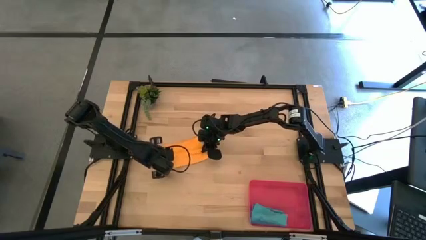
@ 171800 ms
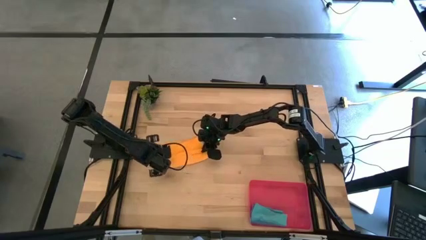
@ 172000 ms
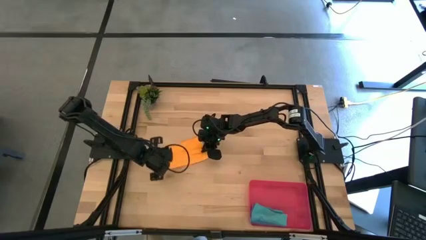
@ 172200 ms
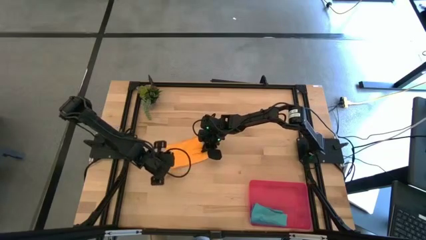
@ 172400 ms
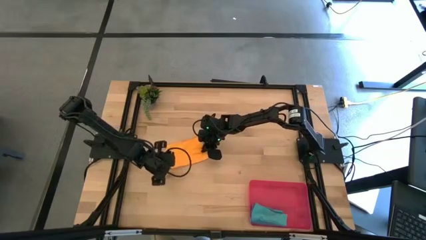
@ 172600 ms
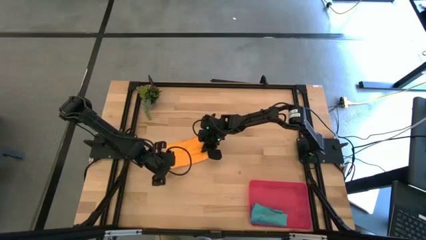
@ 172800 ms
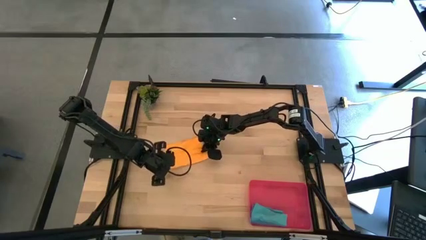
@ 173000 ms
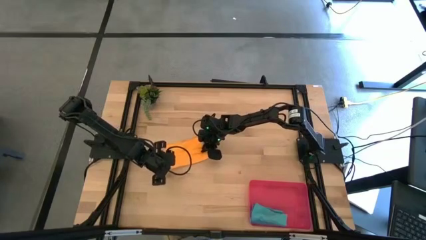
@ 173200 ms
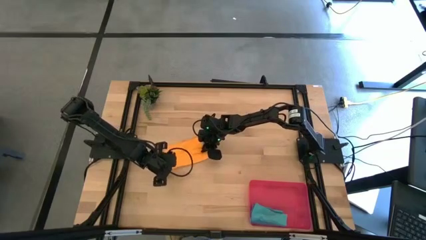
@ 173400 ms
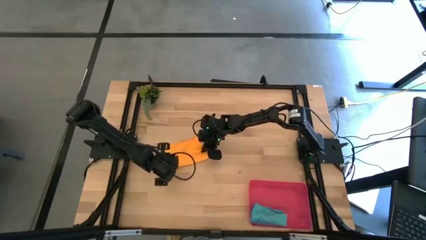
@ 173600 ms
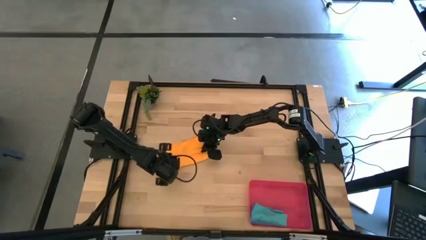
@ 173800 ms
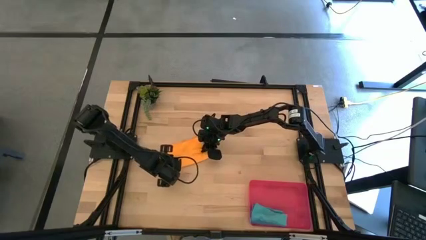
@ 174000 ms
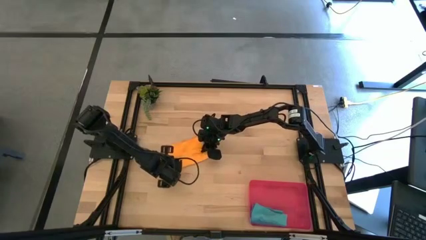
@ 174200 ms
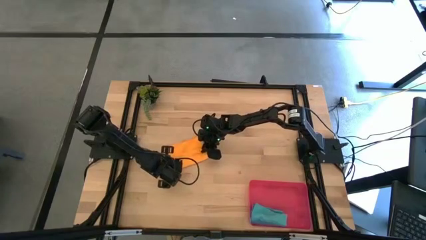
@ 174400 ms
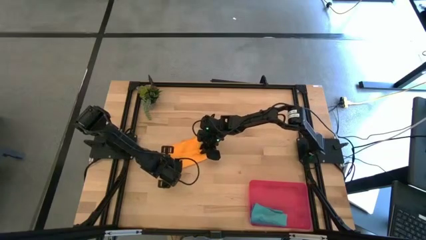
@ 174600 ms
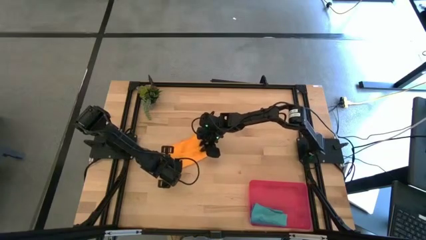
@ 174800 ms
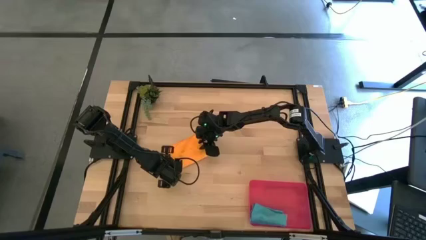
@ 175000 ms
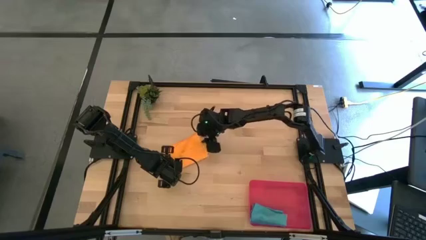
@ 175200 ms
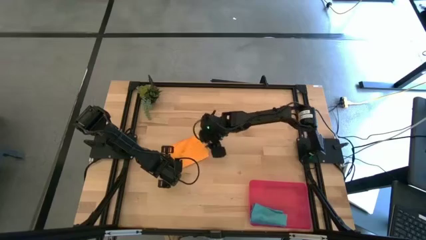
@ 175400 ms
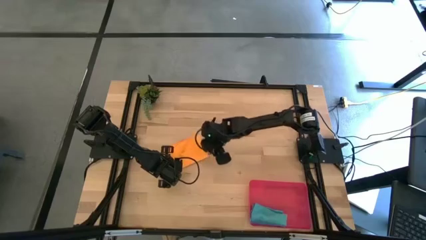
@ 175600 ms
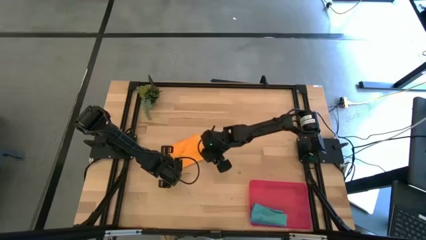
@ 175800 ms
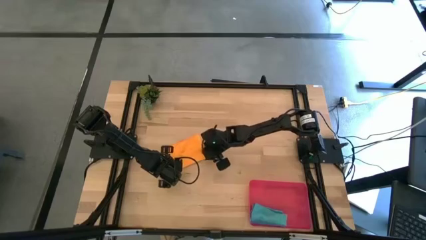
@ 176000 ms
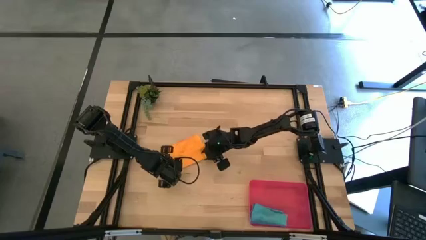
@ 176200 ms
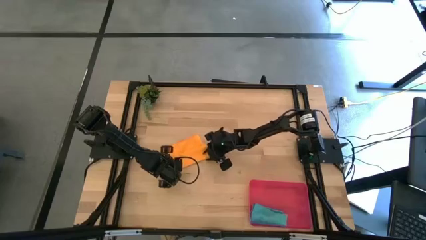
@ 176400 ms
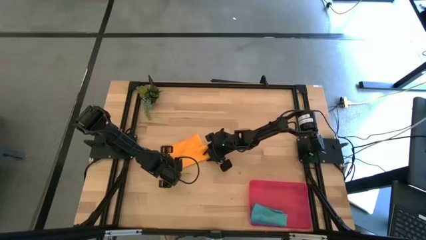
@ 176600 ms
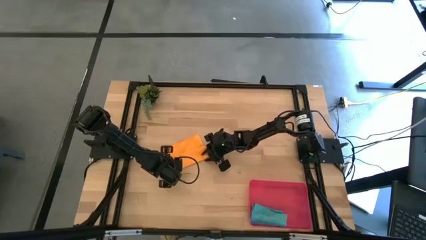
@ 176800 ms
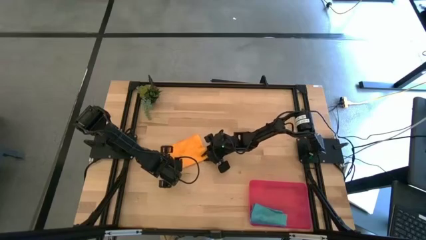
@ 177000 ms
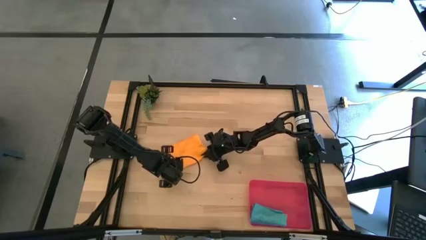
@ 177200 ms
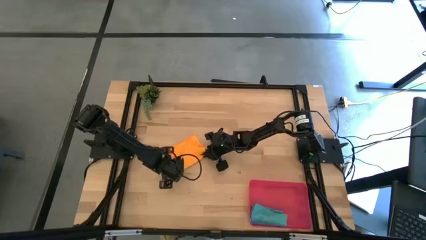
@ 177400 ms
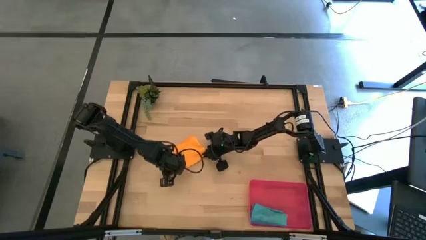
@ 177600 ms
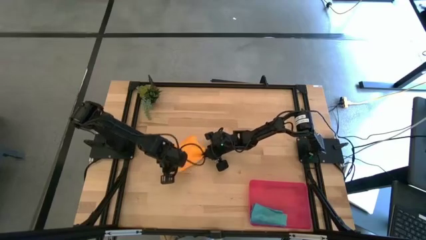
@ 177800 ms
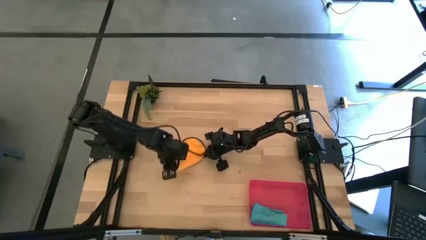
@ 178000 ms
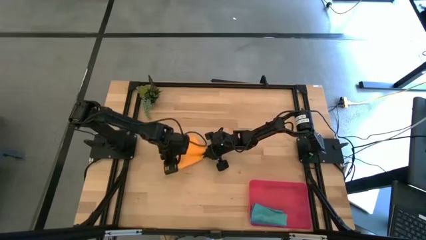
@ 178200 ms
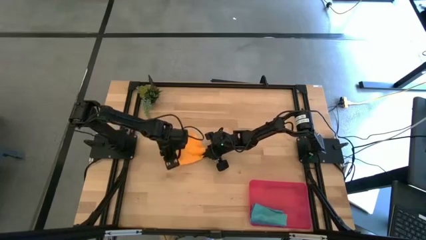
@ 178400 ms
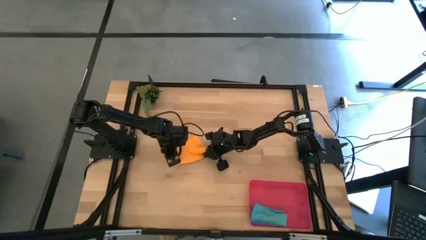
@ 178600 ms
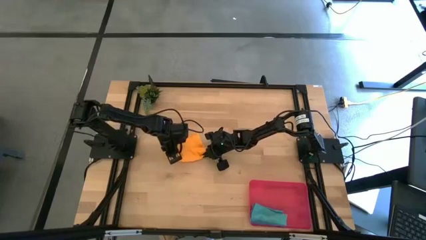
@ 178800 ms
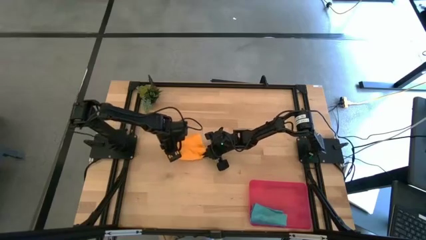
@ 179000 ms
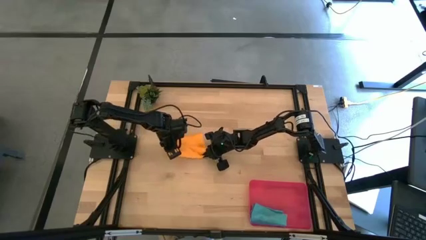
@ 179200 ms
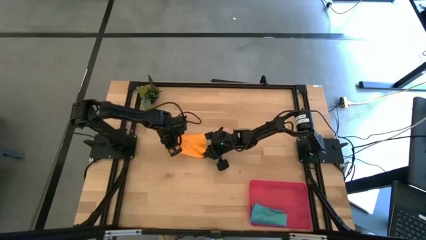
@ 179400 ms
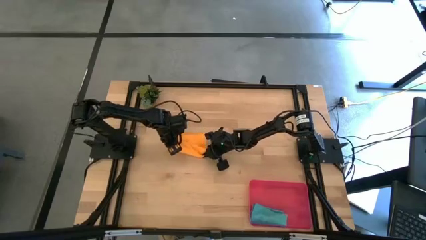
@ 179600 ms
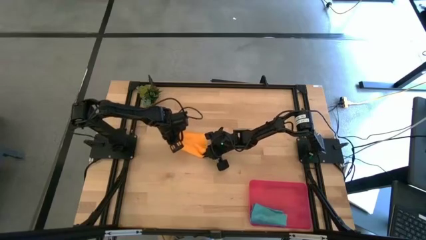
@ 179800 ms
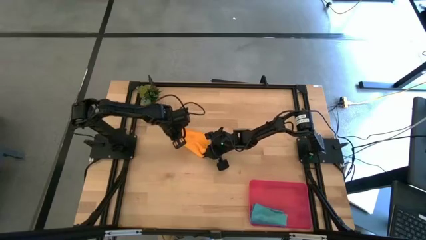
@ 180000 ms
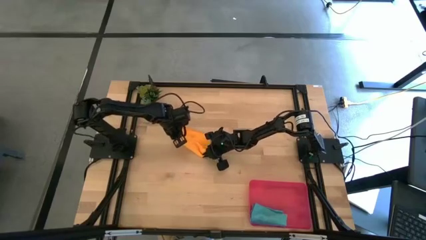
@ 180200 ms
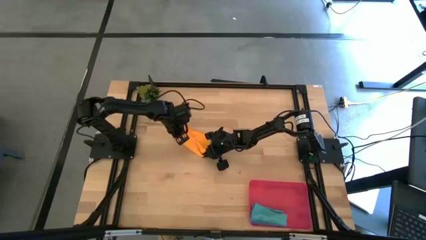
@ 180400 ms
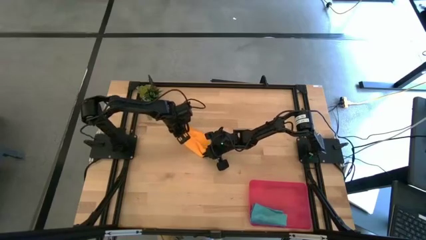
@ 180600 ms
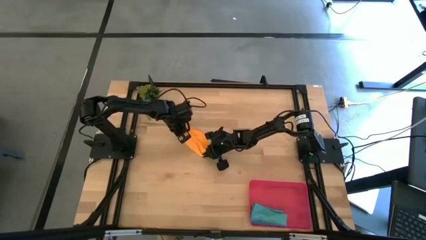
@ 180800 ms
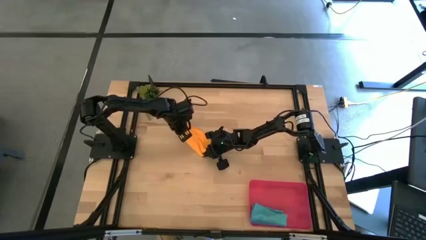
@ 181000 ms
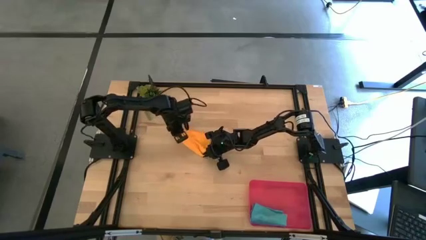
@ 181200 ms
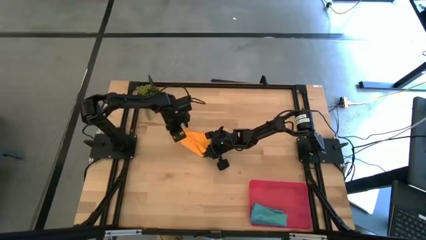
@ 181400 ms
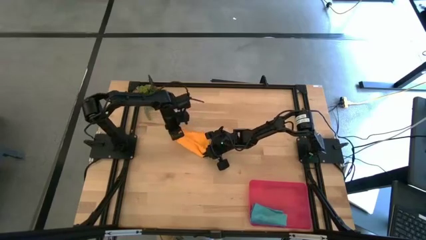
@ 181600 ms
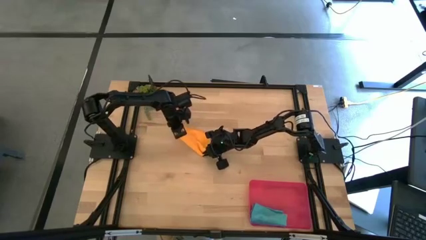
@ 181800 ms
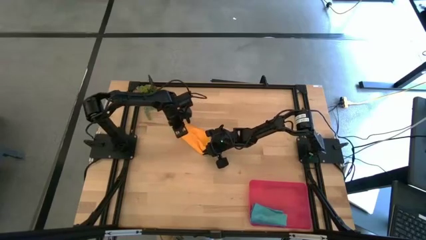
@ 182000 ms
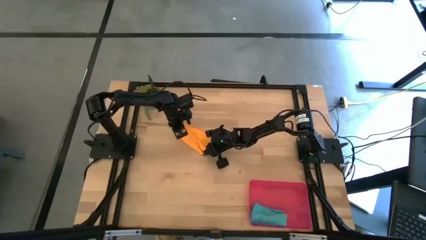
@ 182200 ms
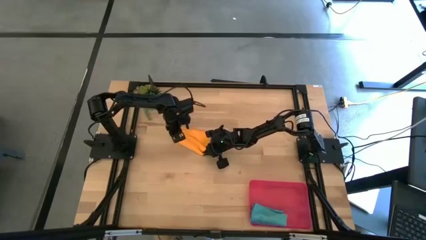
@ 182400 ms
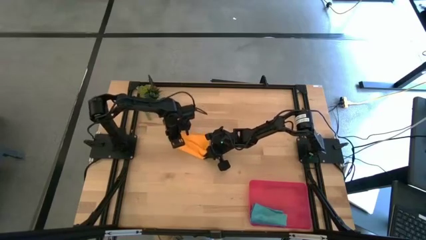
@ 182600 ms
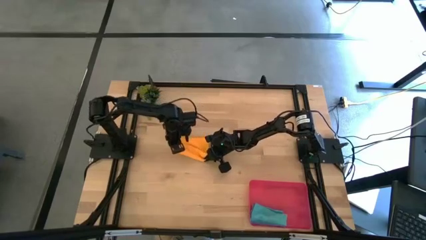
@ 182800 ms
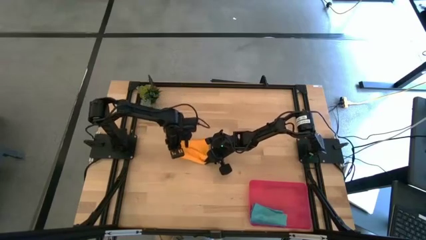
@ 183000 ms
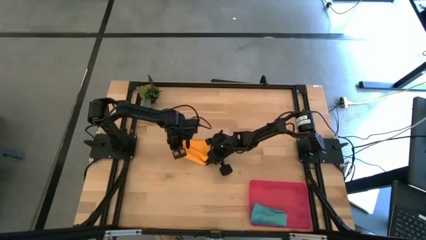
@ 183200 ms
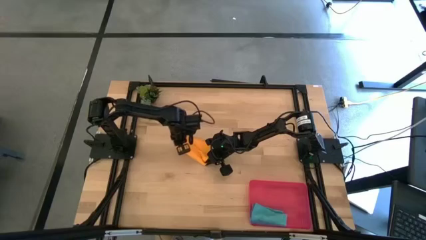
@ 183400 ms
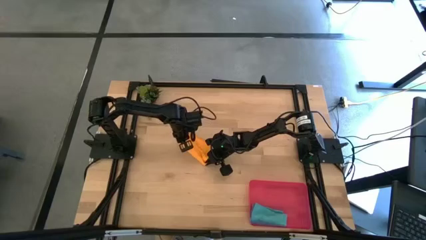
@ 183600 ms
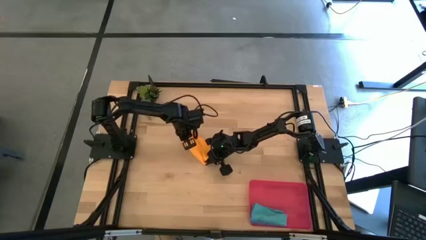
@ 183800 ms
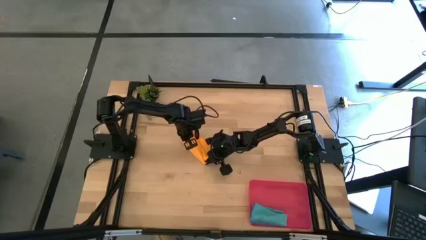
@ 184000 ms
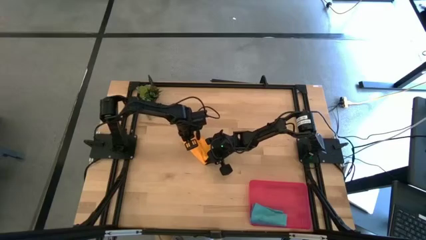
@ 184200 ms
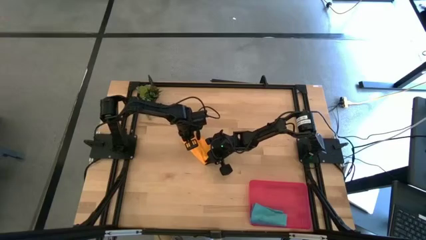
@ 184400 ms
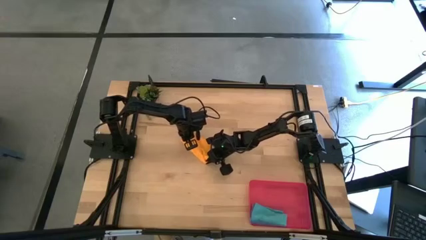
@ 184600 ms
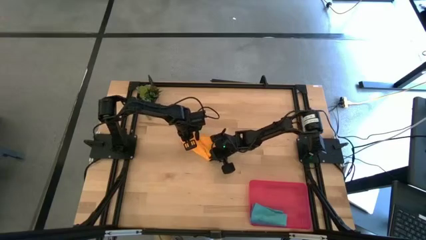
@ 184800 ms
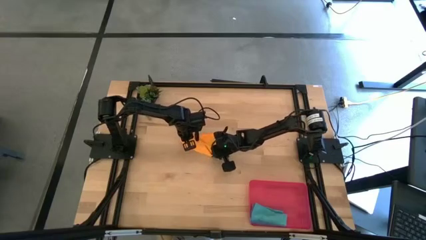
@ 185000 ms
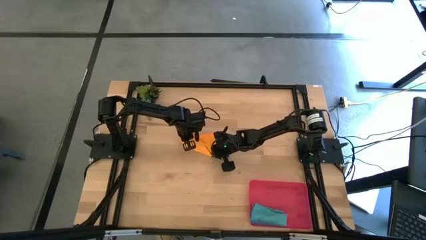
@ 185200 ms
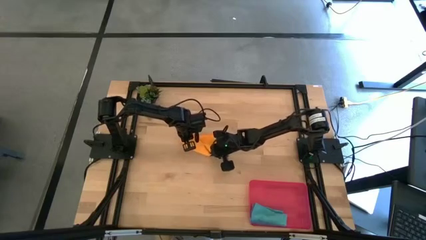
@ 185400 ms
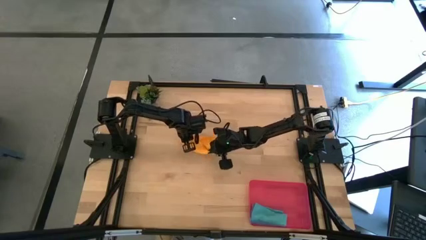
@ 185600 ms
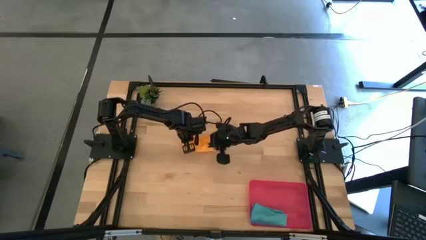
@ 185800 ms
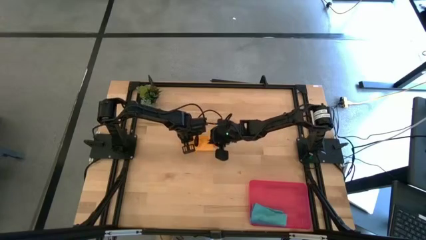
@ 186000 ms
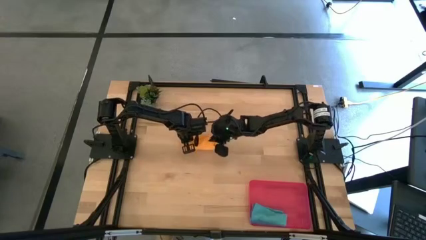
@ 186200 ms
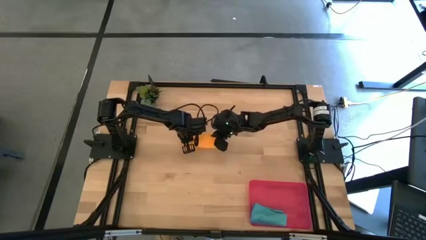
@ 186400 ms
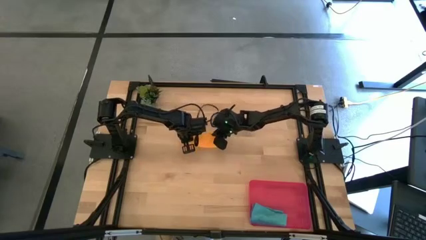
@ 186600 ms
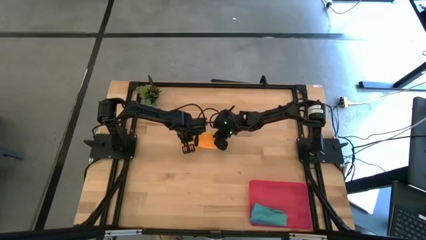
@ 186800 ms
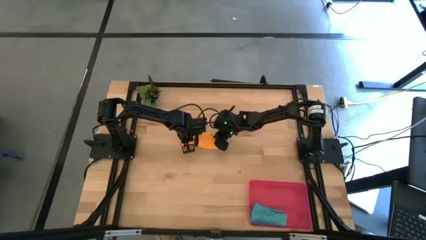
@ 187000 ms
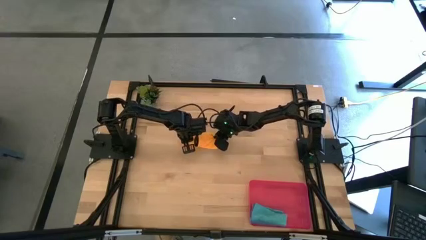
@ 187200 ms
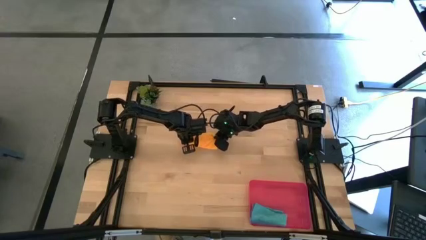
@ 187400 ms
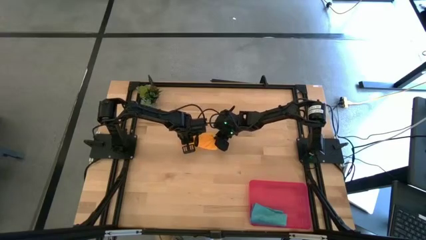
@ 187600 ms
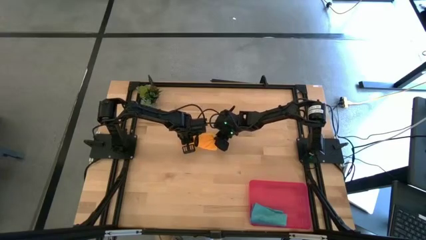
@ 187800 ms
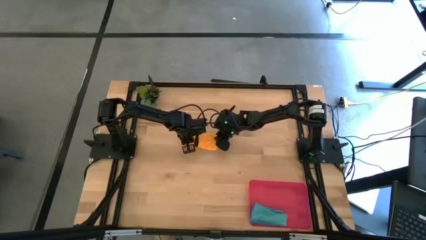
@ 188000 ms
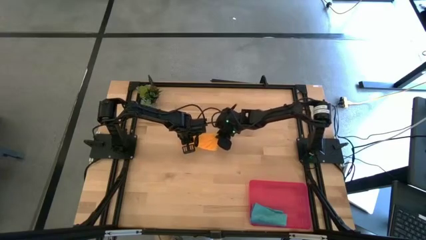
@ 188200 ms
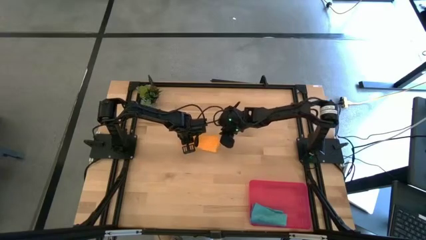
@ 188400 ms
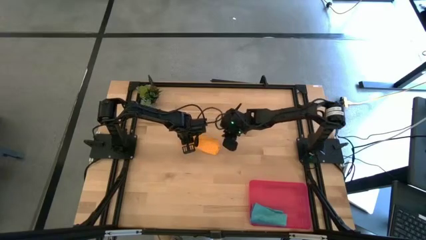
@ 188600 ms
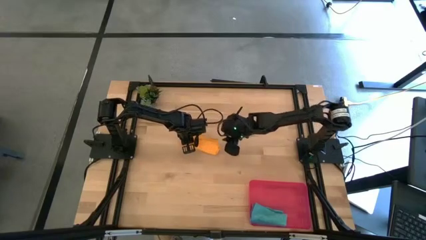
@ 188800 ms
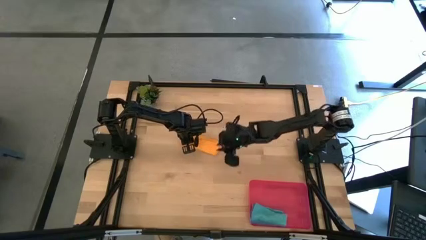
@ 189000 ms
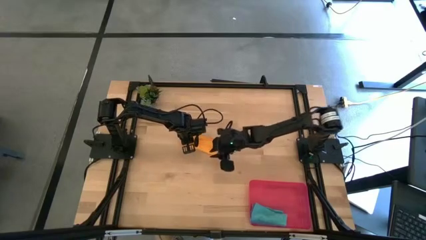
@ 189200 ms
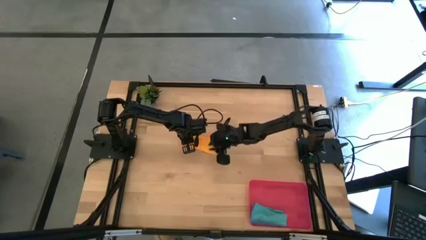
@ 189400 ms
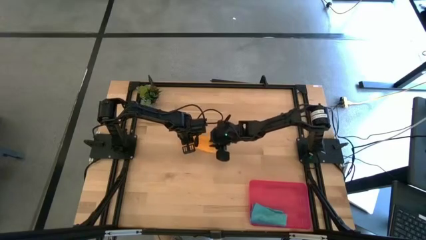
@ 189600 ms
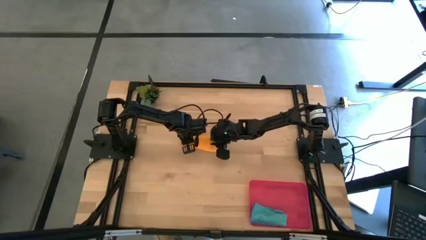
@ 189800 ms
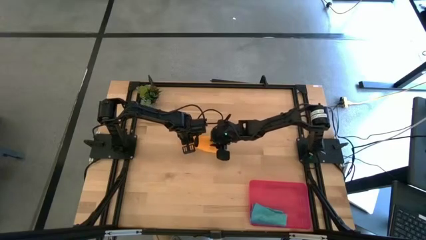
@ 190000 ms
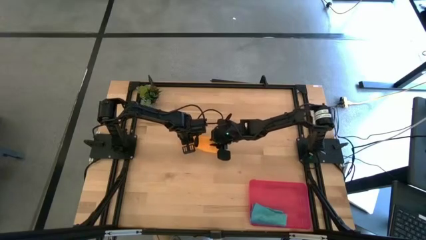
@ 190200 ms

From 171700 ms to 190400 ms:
Task: Roll microfiber towels into tight, uniform cylinder then place into a basket
Roll the orange microfiber cloth
